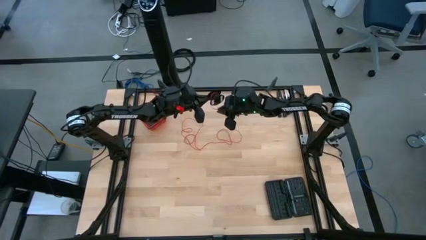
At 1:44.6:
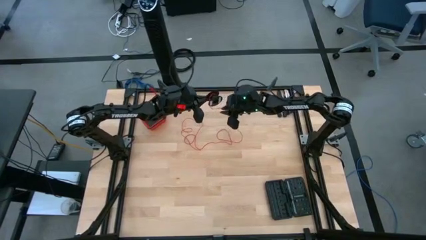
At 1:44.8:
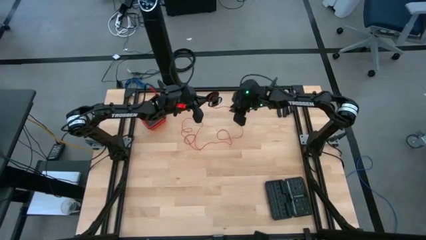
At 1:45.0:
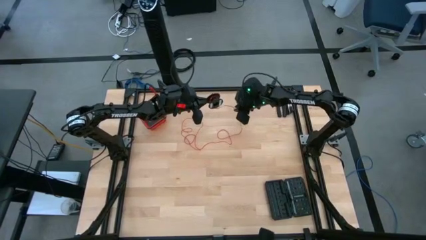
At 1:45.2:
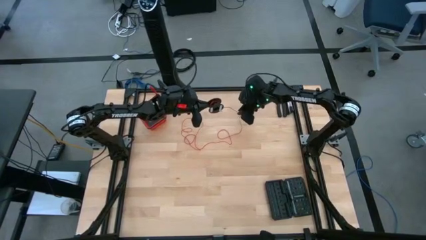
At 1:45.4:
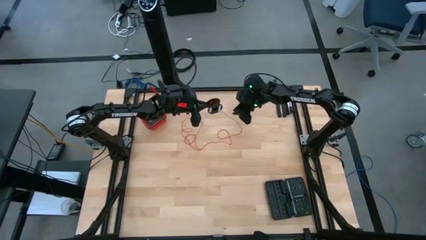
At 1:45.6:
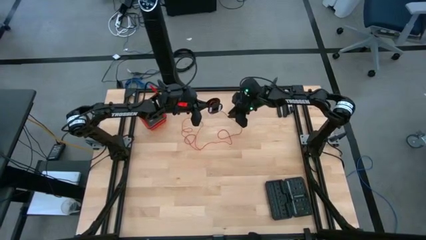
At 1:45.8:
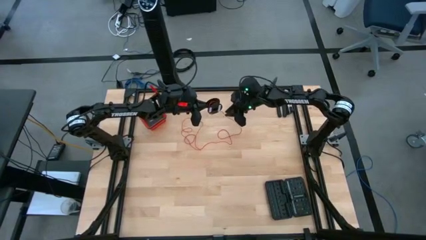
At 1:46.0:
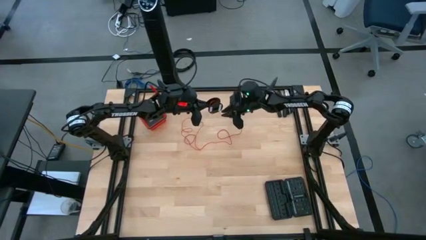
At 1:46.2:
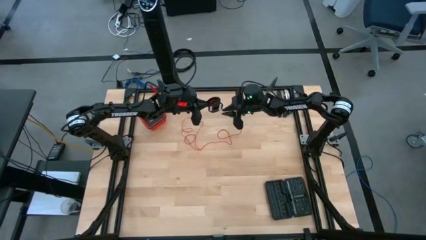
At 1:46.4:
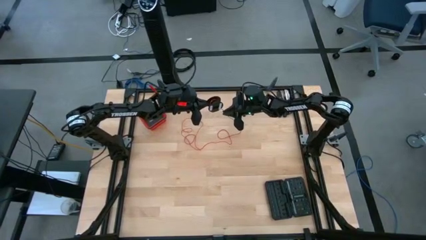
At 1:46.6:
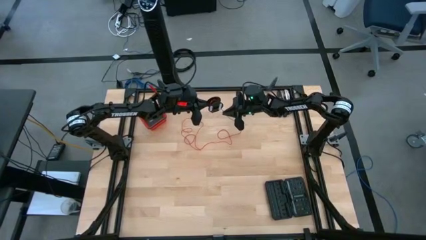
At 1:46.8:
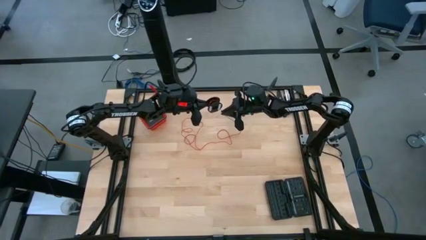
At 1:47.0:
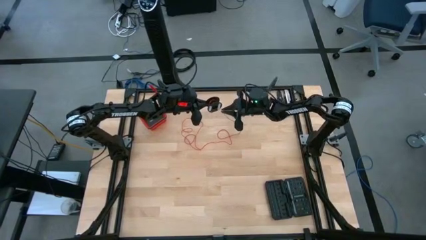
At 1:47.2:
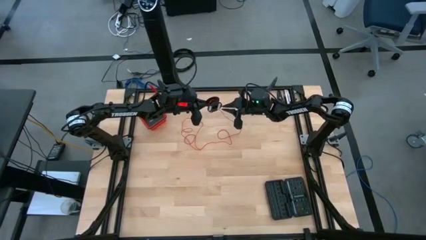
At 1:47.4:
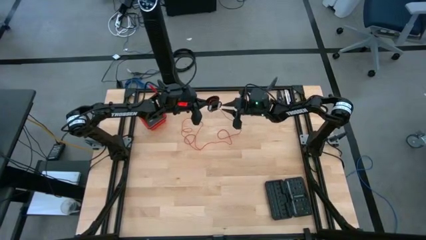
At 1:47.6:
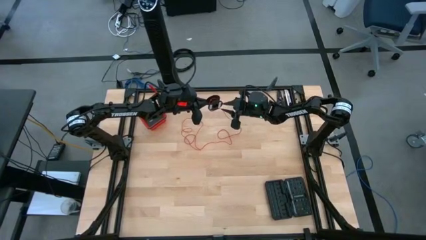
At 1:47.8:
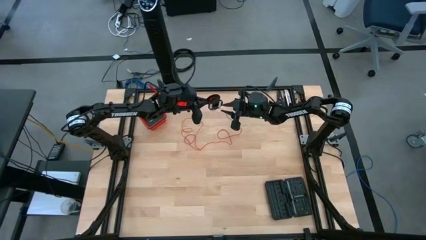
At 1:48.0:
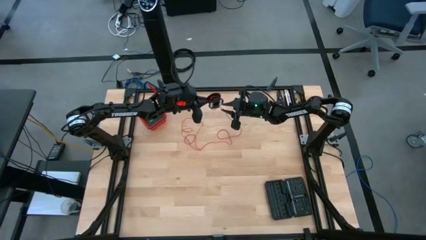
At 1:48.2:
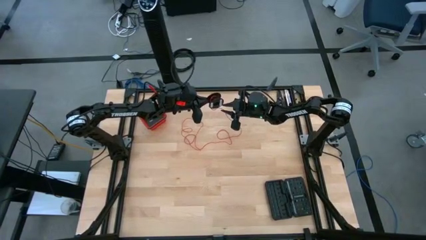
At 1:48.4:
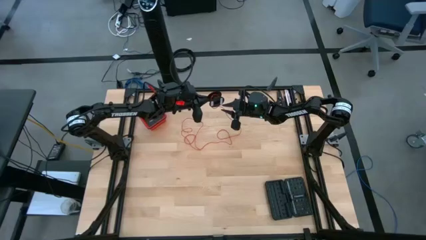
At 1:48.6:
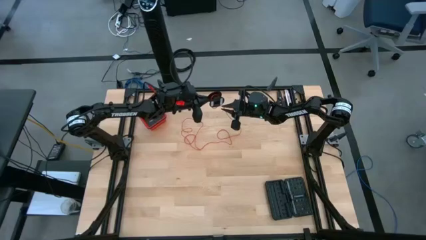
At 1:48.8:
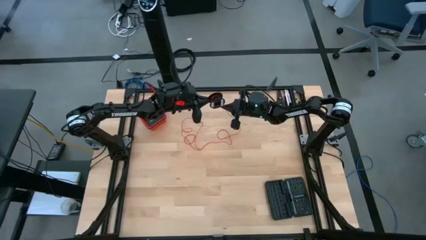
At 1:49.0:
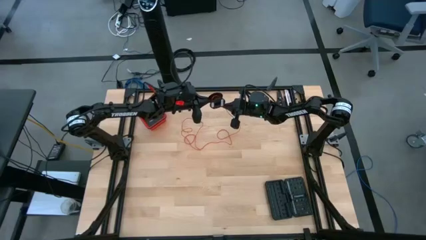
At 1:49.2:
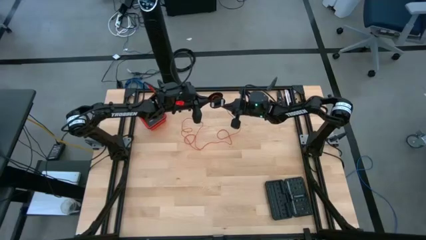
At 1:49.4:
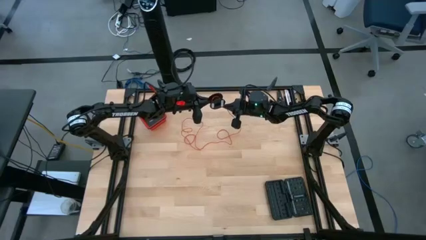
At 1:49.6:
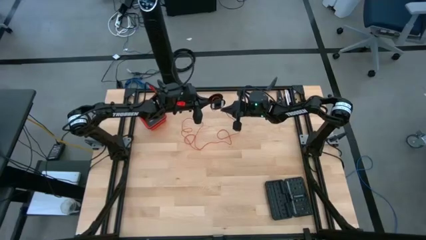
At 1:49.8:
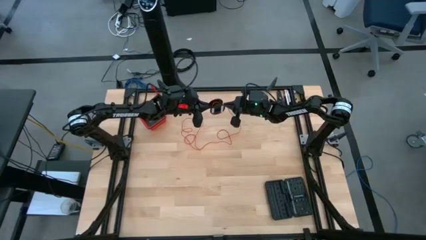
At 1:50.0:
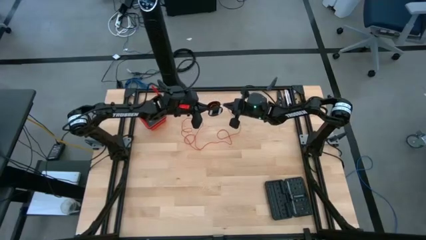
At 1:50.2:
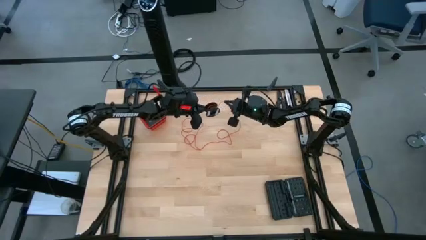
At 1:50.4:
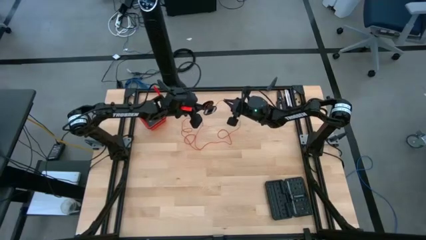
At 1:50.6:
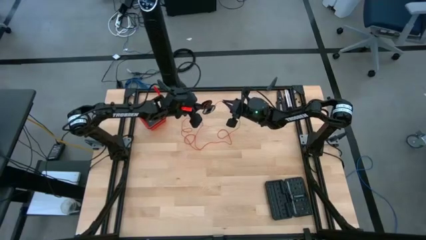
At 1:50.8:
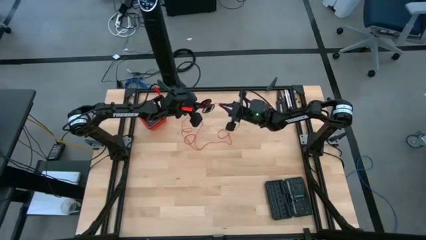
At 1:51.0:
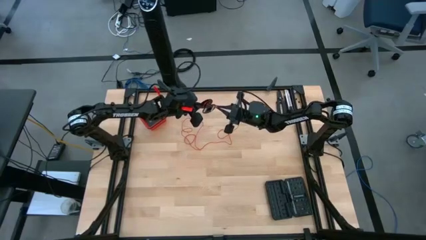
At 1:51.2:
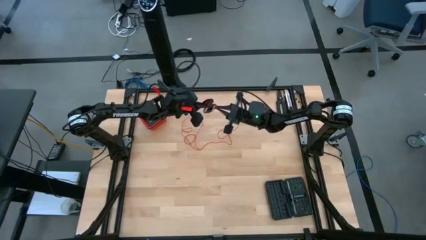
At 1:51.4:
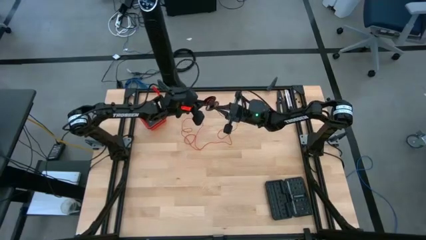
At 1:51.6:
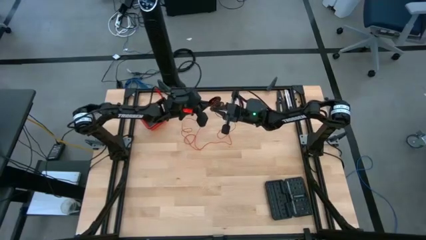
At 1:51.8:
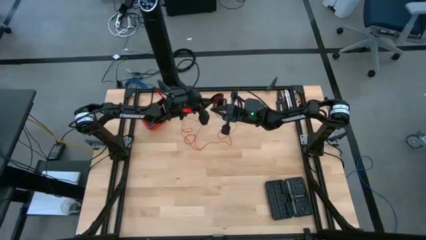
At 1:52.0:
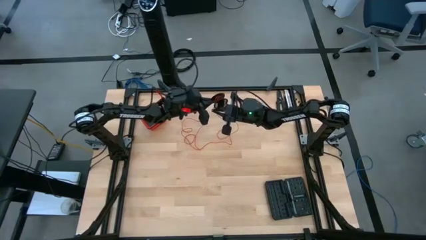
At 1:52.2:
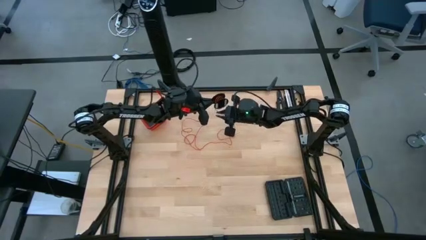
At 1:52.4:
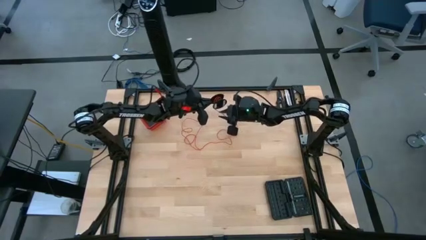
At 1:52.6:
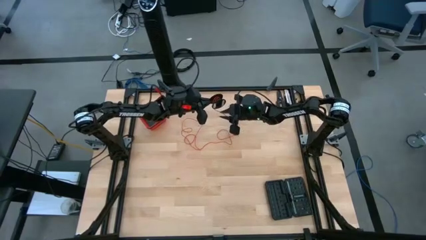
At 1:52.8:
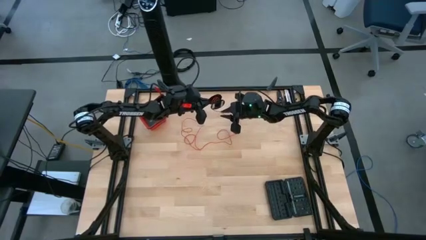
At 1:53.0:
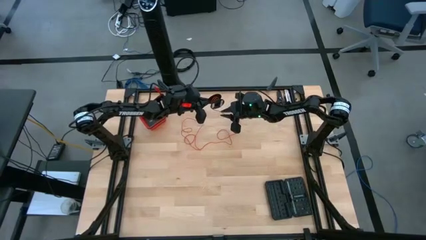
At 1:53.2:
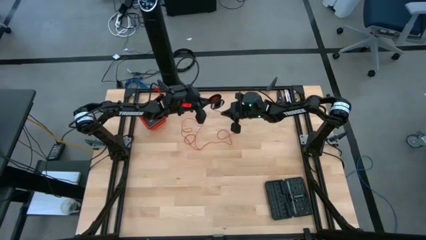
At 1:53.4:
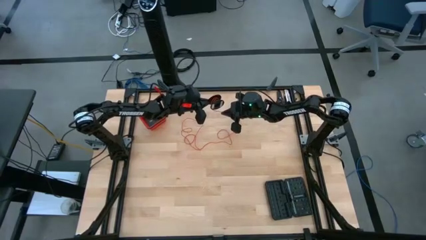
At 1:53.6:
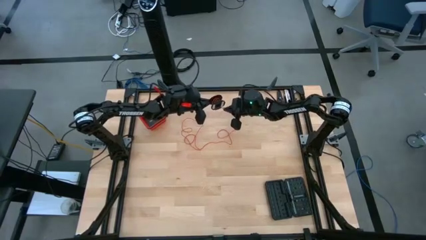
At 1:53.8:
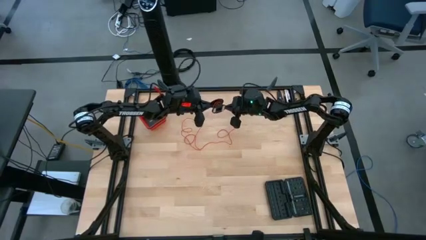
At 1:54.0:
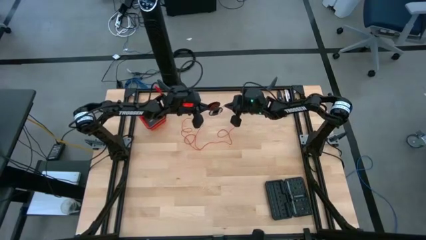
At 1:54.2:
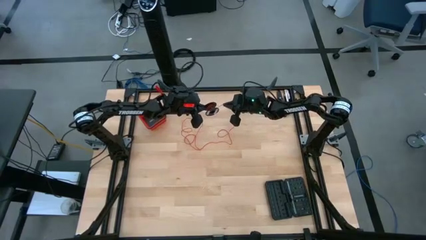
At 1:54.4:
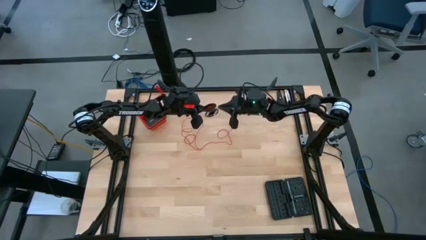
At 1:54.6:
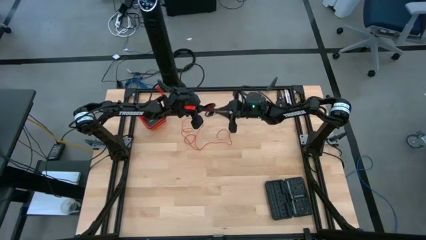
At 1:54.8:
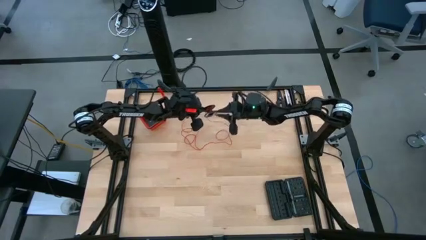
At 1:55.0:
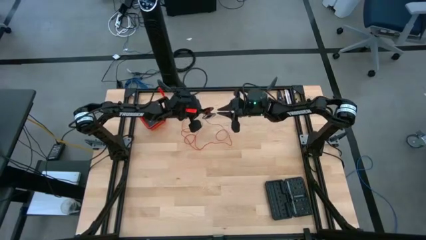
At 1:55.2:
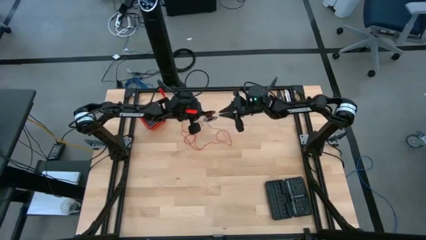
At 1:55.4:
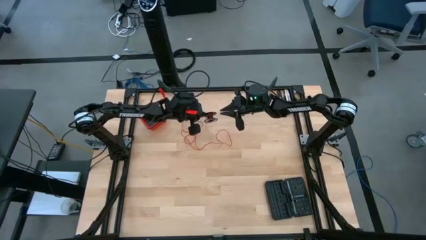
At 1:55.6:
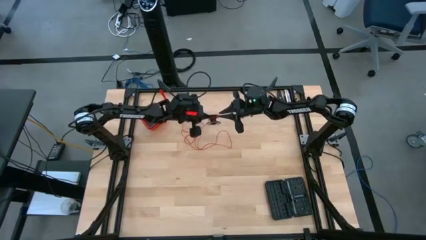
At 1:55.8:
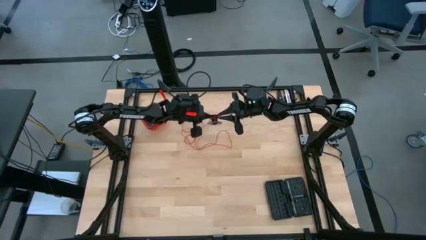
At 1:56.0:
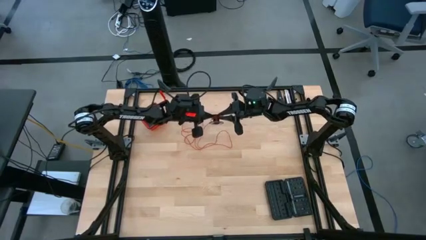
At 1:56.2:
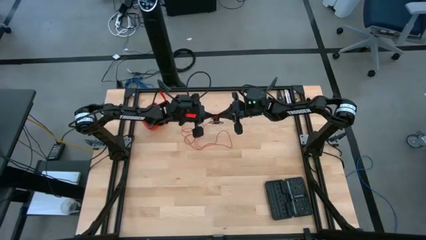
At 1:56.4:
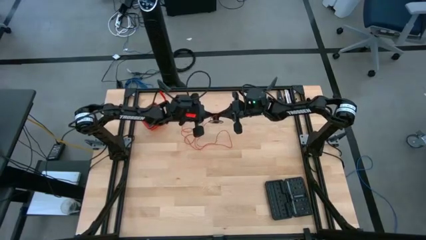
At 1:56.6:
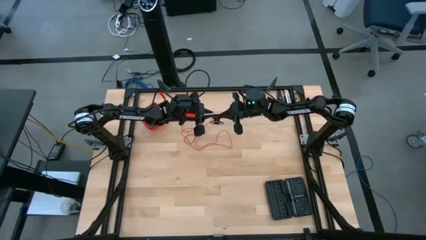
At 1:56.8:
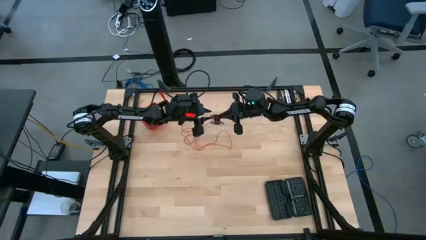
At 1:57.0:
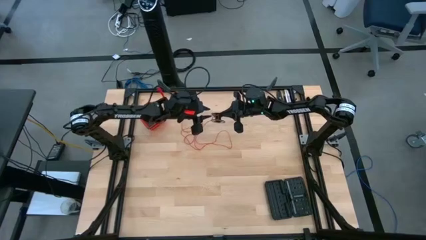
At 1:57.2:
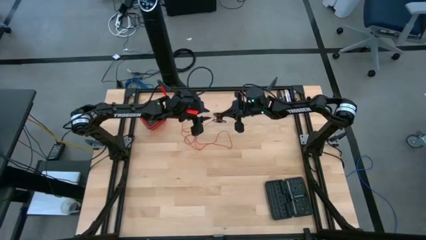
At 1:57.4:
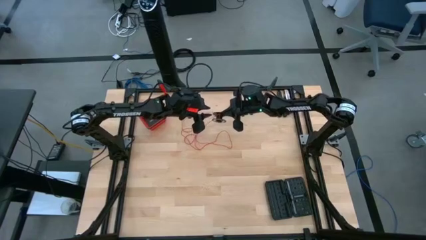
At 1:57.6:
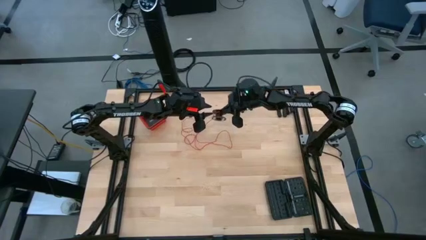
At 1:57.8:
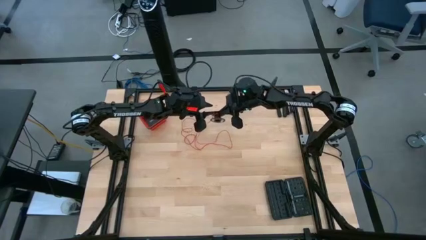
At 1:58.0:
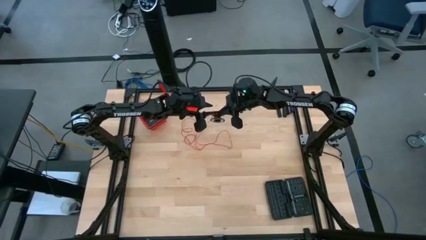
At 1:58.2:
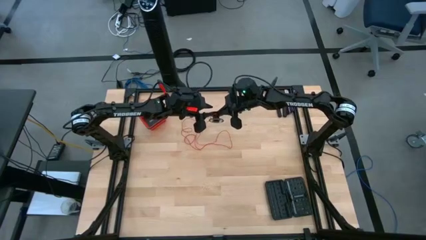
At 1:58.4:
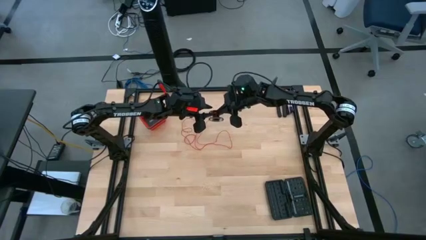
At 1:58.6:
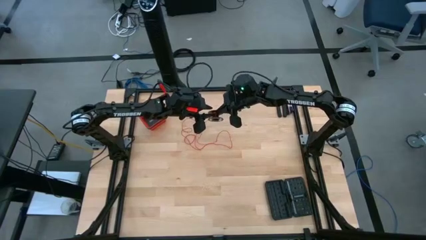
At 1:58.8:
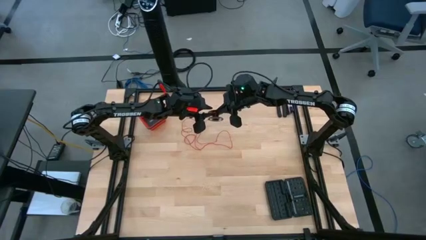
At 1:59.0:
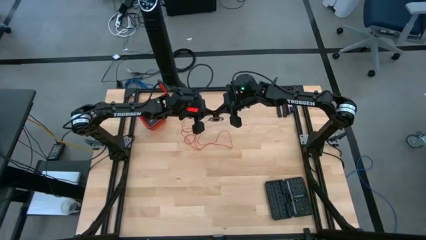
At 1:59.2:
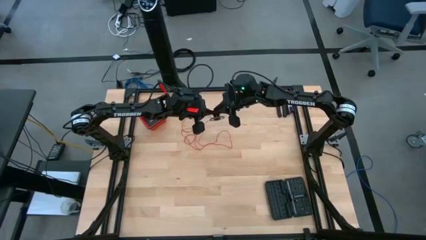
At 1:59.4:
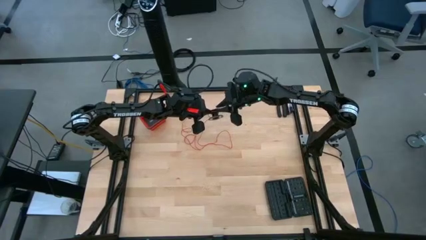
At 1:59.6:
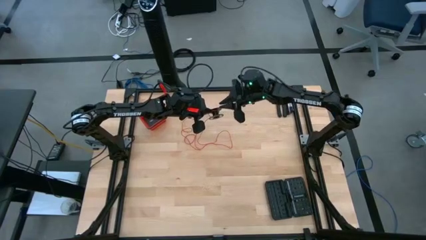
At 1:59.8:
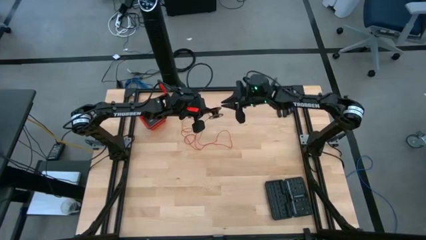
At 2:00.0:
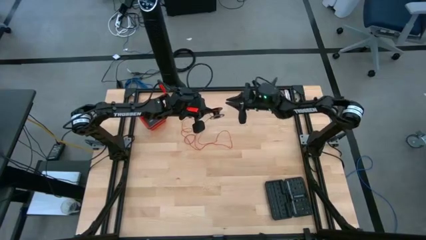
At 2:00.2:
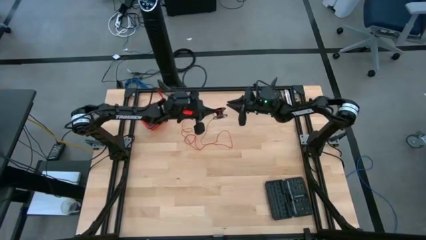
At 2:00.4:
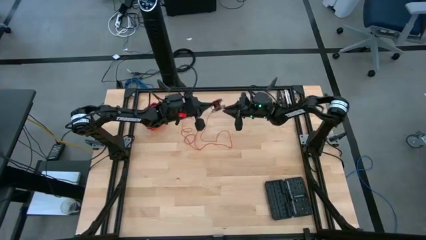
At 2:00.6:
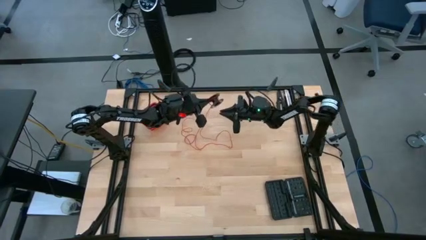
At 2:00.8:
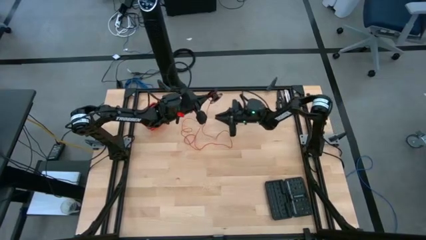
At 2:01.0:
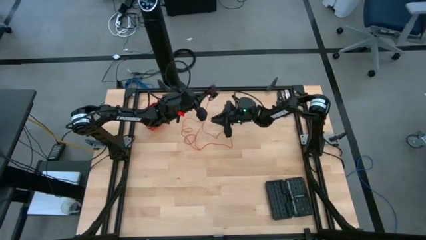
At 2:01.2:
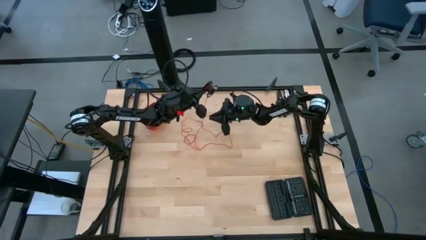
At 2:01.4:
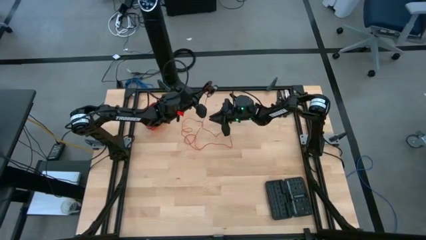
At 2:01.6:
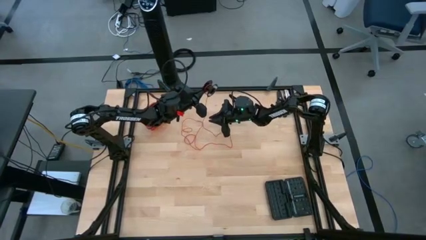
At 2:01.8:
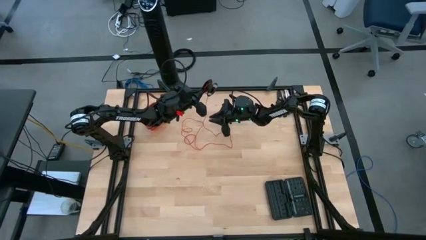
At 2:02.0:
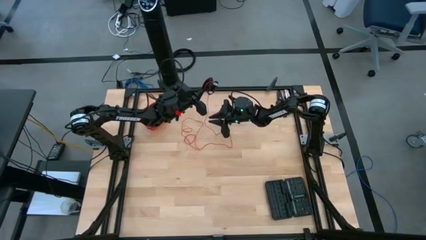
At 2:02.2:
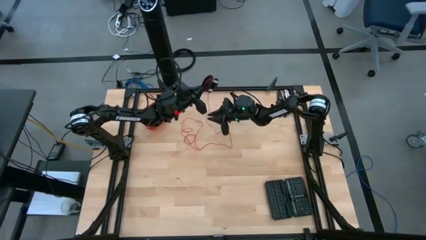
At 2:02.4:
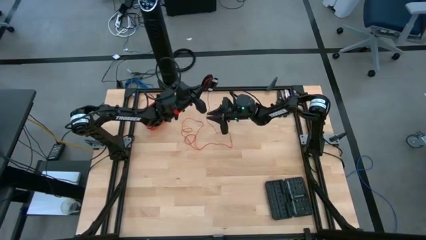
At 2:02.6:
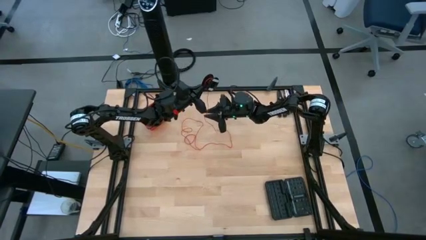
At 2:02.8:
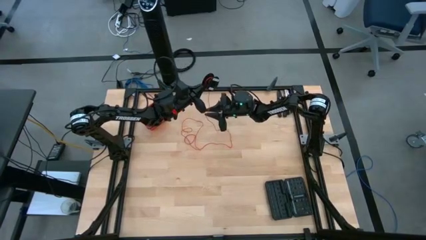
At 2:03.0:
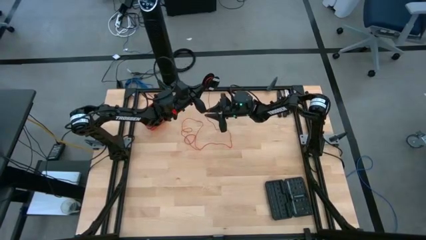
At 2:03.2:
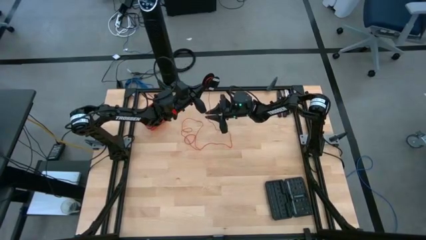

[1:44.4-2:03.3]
Task: Coil cords
Coil the wire to the spool
